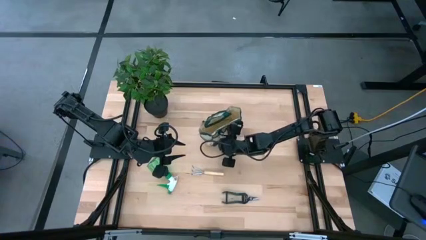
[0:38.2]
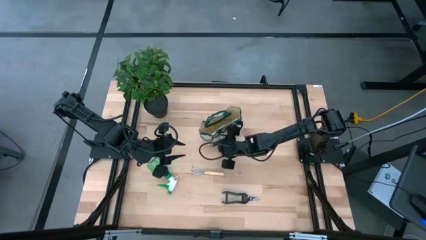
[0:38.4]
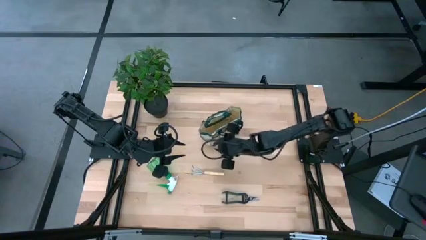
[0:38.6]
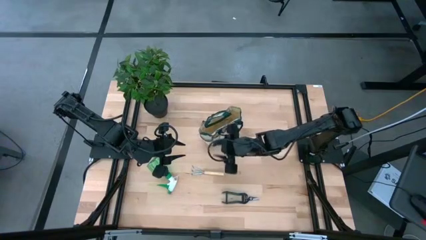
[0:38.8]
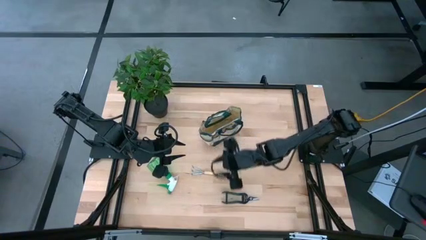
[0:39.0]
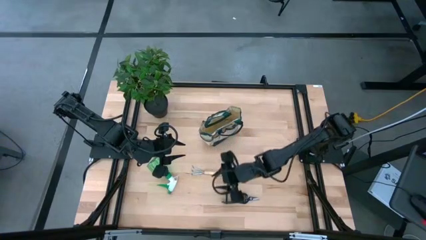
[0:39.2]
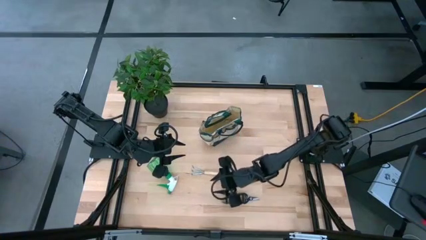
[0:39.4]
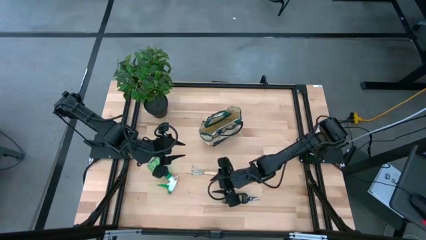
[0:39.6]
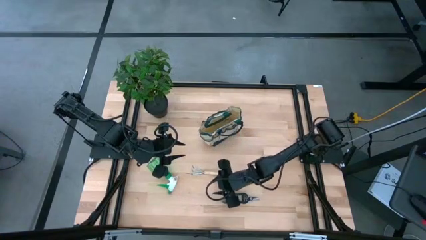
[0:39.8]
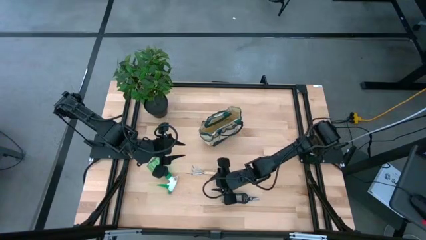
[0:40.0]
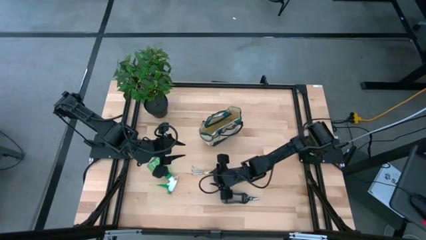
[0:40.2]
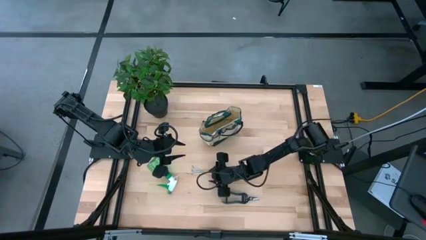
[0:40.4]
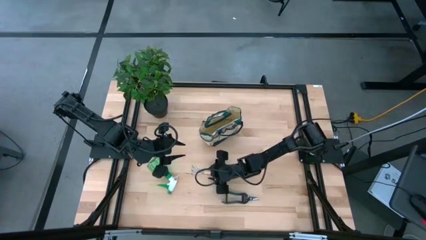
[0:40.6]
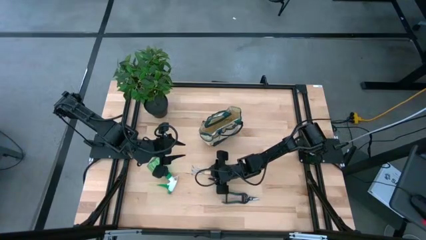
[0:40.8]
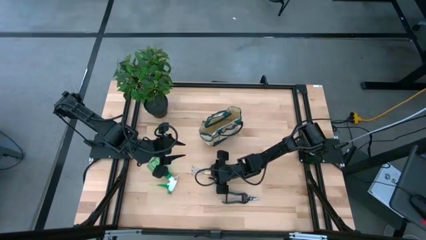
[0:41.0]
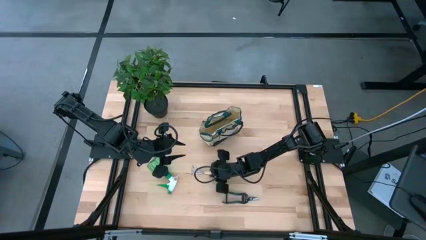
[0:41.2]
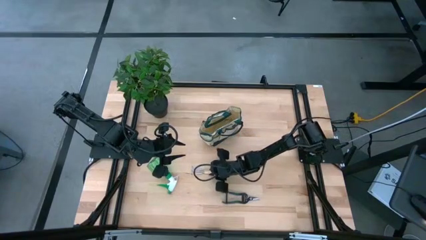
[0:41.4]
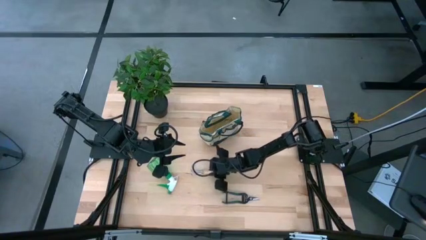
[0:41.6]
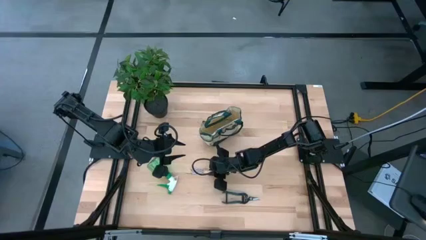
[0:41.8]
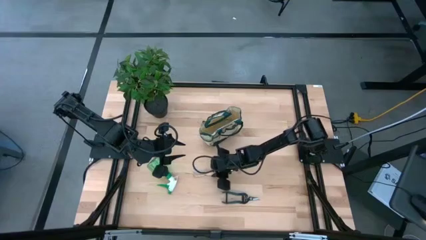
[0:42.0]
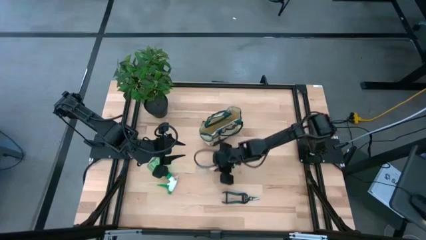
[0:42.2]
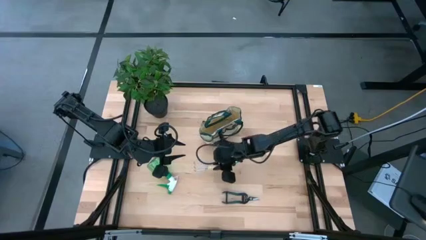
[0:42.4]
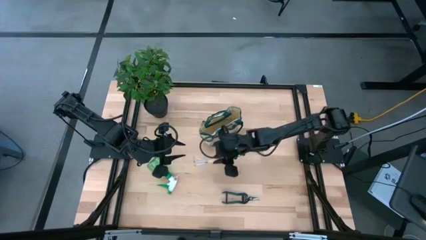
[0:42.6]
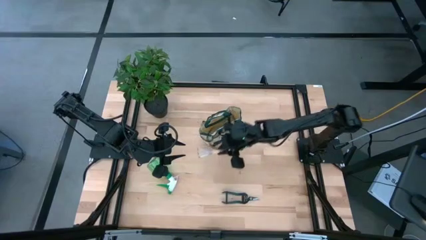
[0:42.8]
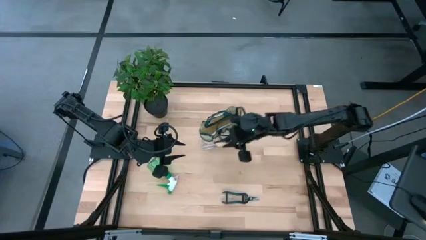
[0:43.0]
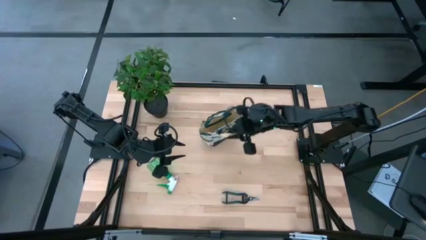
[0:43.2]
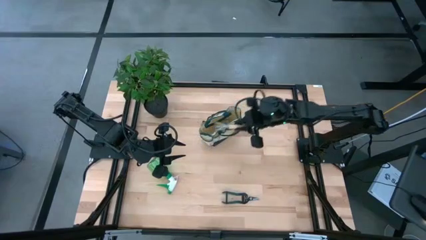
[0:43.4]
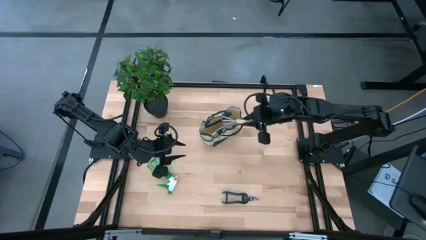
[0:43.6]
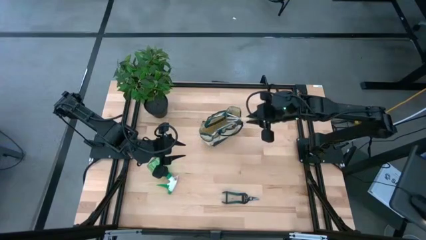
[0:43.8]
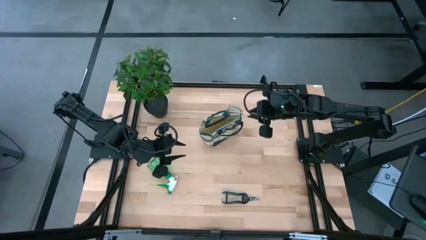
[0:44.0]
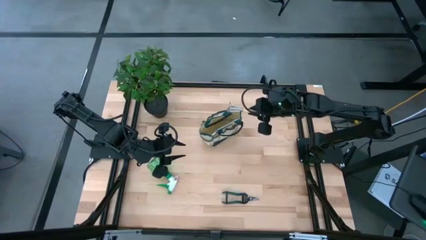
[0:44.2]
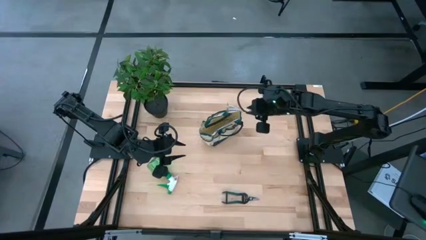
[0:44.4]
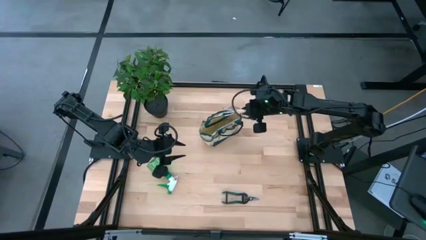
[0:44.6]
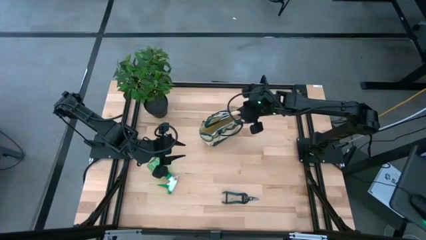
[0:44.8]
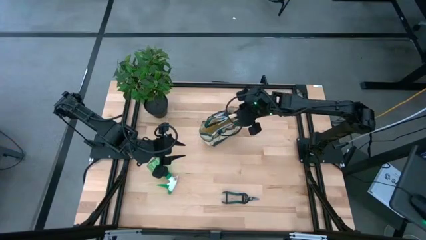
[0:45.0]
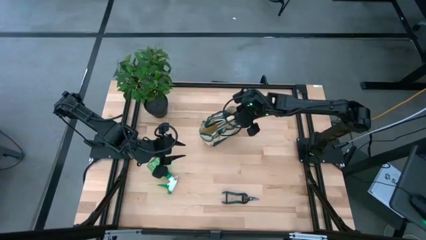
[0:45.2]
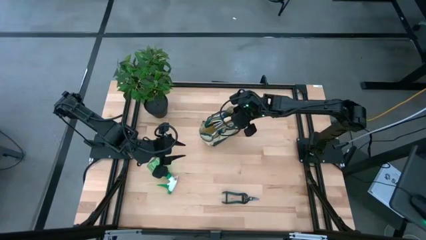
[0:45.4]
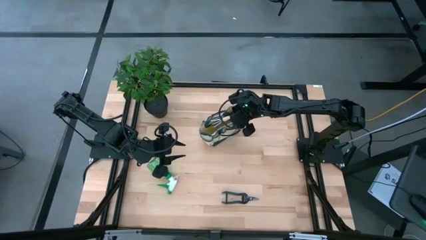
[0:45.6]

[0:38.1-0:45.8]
Task: Pick & Place Garden tools in Gardening bag
Put the brown hand rake into the green gardening bag

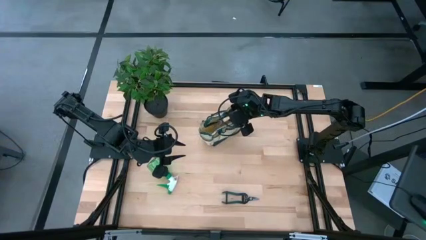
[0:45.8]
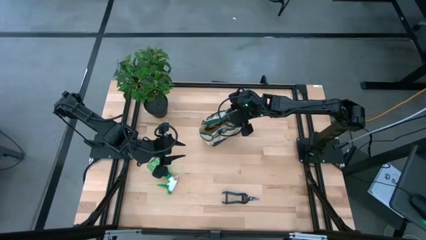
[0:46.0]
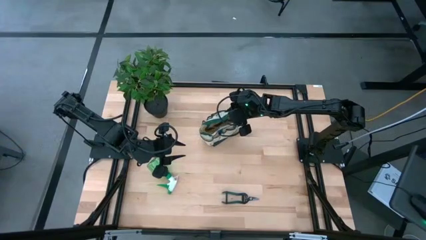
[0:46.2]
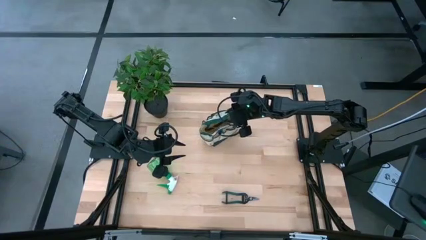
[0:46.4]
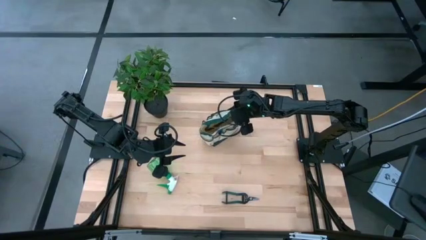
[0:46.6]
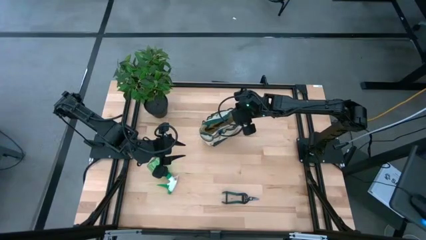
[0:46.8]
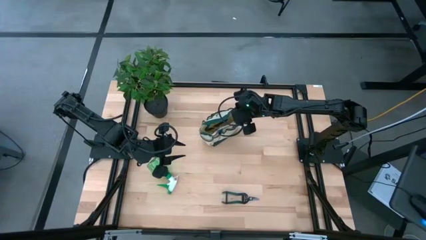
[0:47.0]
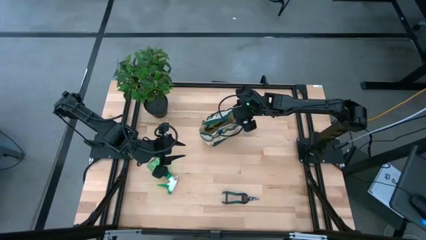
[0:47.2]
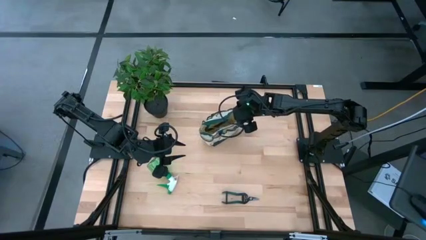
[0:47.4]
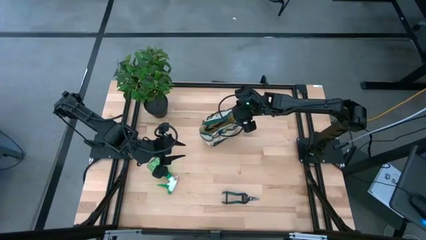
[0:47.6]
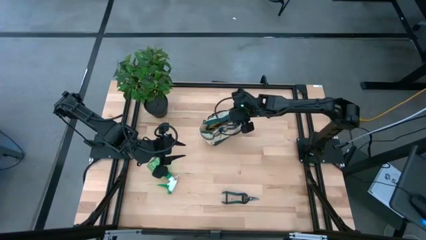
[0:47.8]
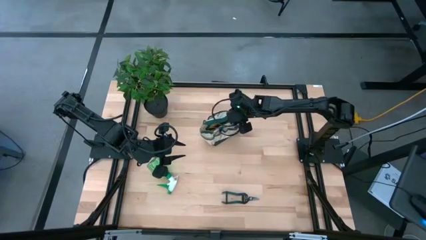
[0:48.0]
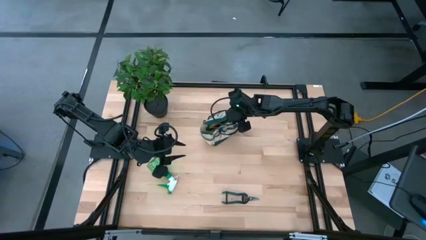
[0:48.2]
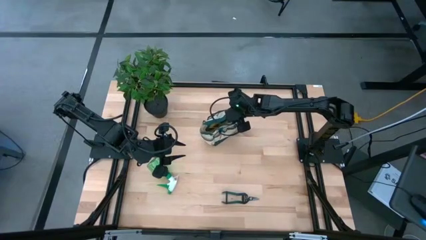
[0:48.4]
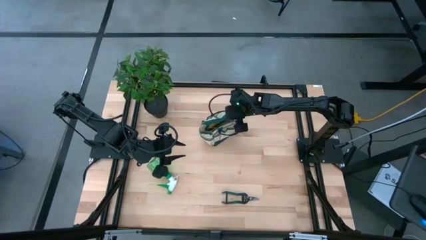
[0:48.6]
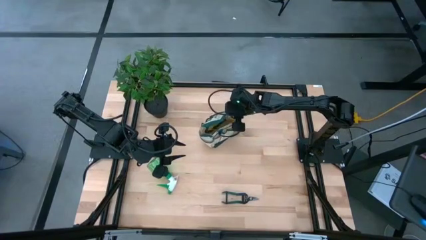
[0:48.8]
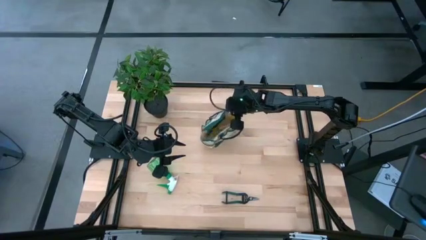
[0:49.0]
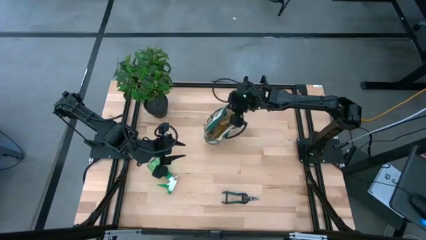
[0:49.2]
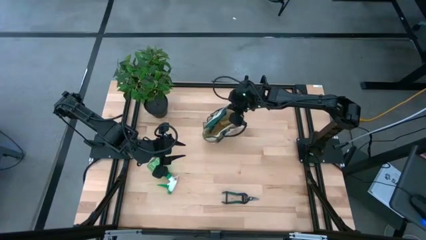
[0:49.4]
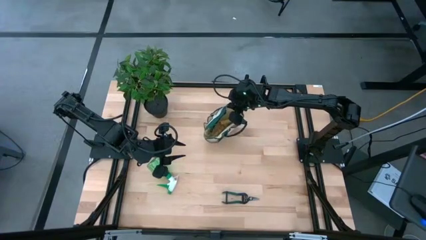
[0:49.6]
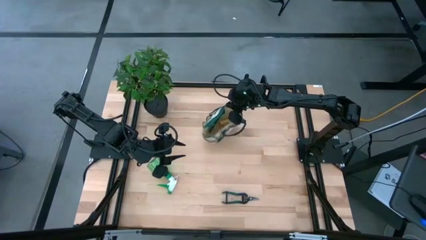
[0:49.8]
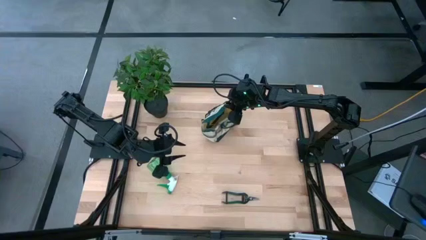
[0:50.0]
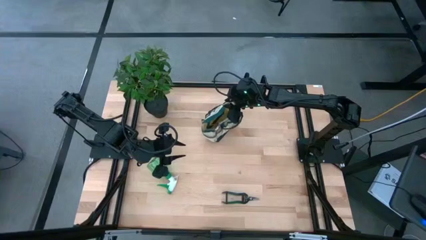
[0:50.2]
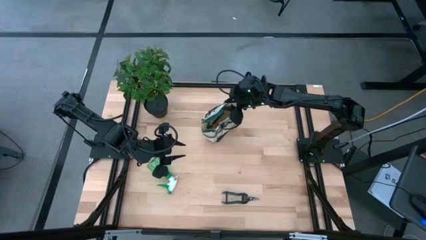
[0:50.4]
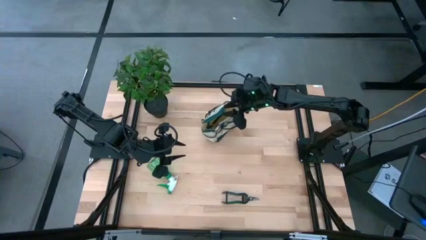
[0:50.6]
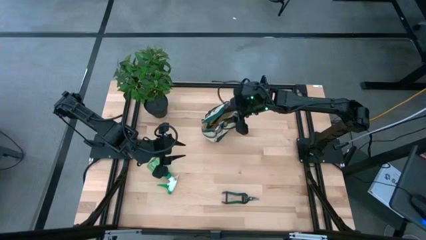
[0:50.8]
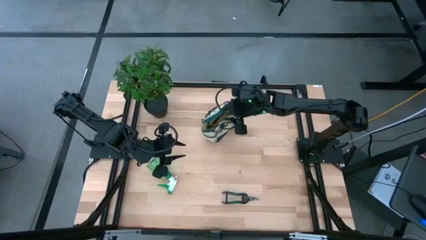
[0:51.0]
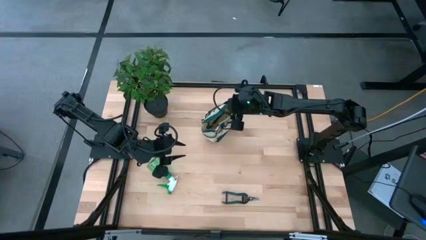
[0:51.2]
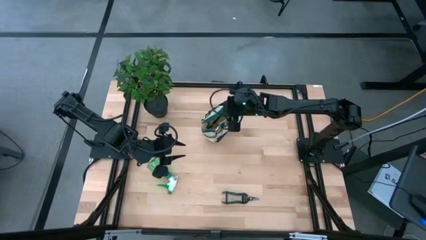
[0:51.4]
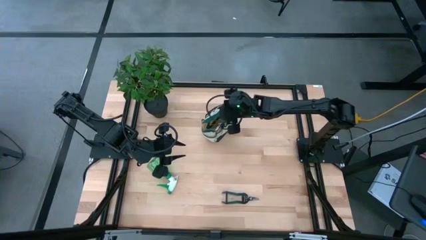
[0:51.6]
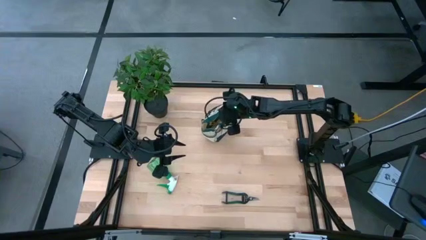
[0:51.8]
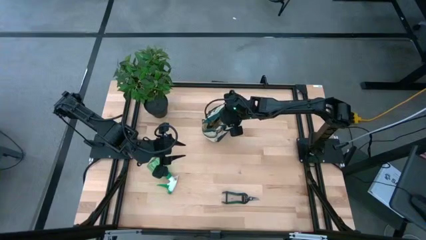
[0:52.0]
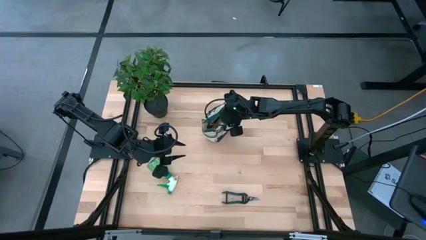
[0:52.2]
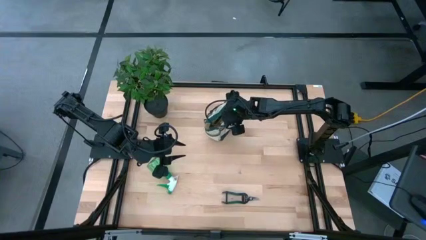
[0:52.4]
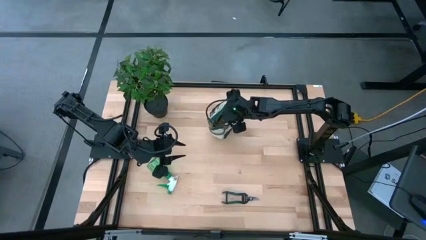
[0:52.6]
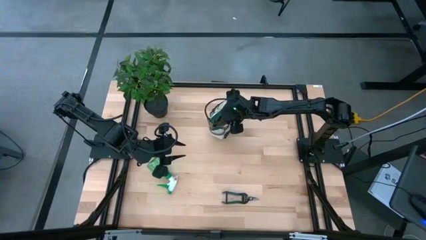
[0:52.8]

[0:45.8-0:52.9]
Adjust the green gardening bag

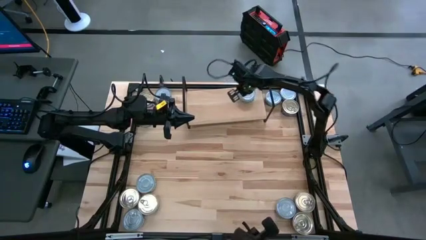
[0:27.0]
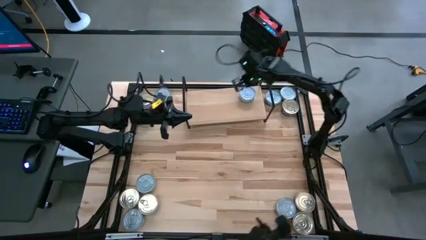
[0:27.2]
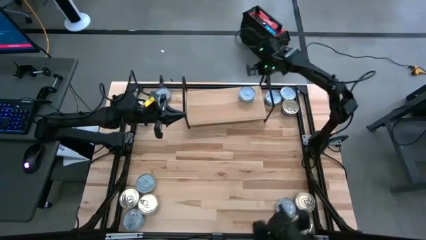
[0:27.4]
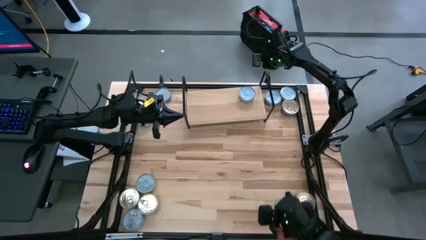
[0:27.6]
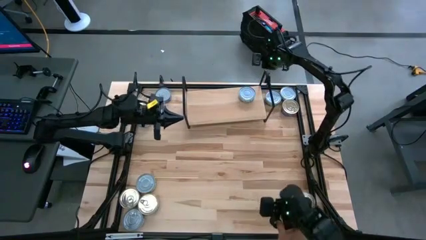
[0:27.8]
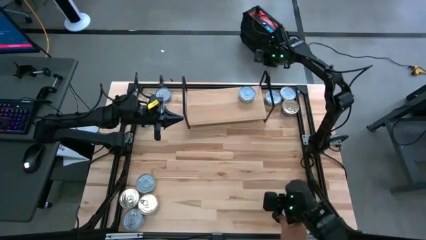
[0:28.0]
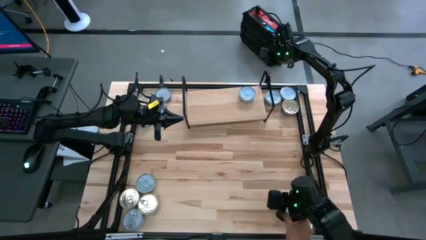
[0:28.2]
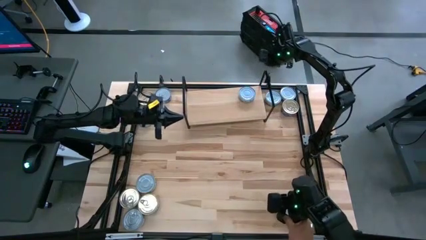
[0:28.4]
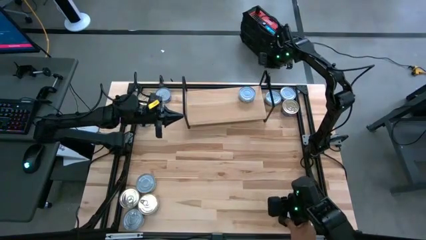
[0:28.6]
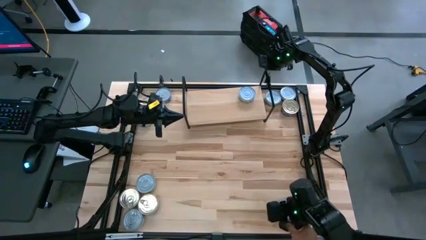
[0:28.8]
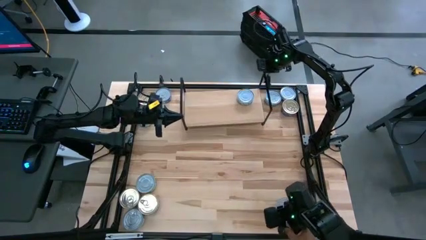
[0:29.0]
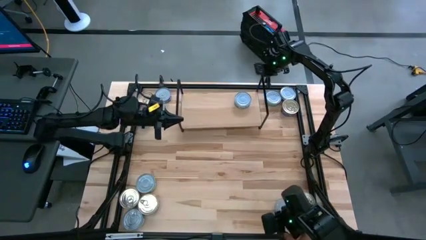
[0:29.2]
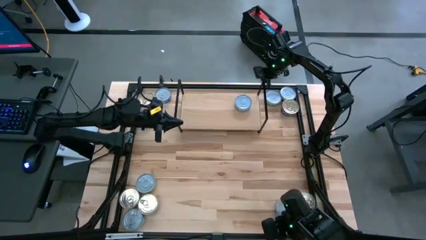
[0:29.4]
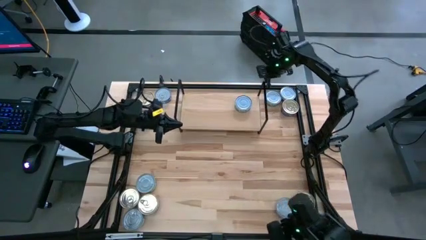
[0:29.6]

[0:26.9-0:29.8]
Task: Stack canned seafood by type on shelf
Adjust the shelf
